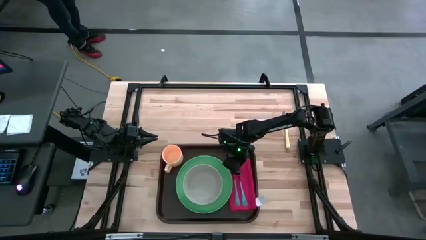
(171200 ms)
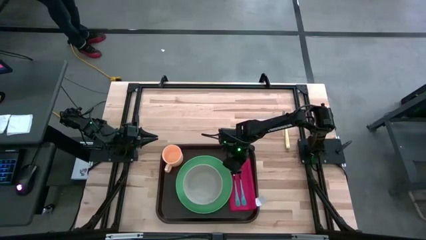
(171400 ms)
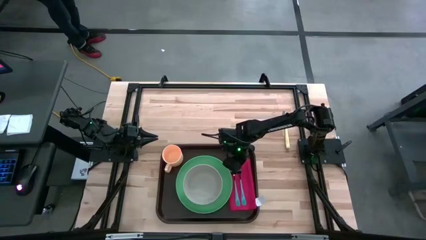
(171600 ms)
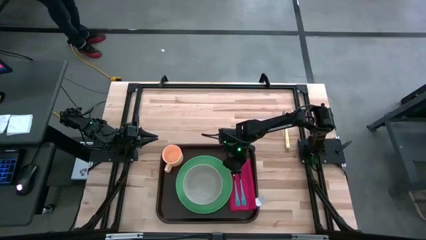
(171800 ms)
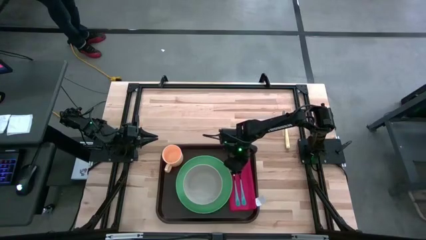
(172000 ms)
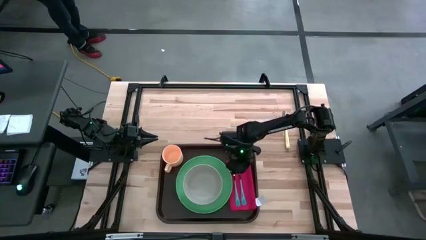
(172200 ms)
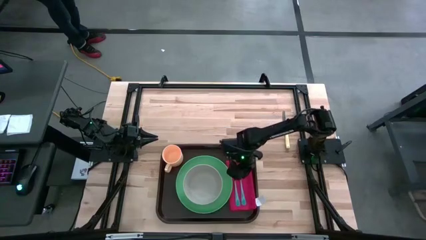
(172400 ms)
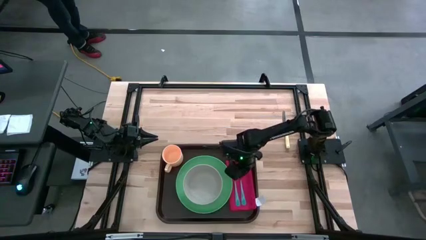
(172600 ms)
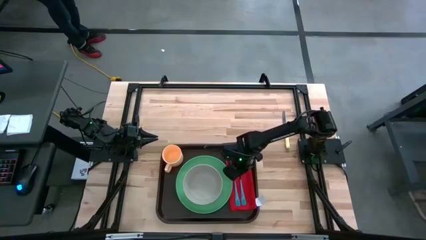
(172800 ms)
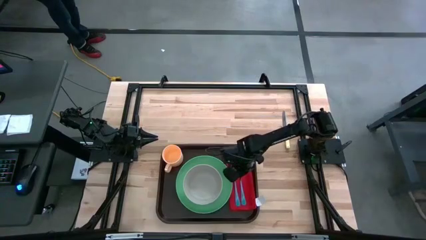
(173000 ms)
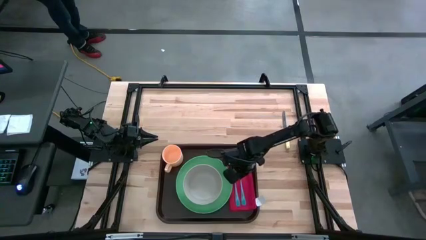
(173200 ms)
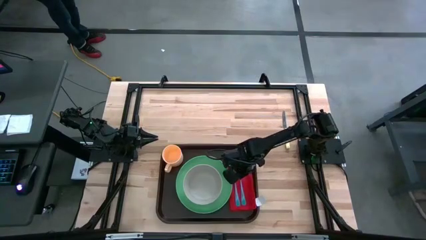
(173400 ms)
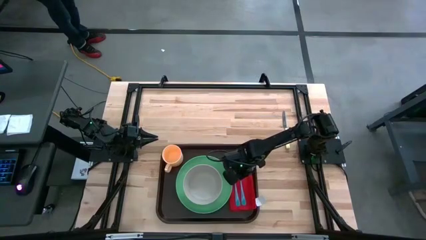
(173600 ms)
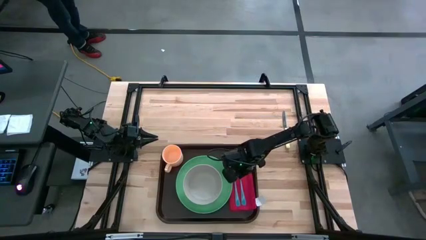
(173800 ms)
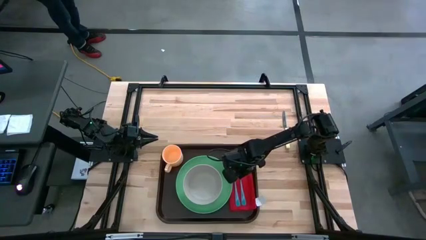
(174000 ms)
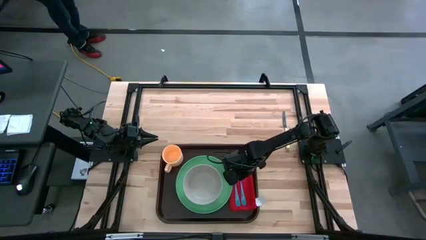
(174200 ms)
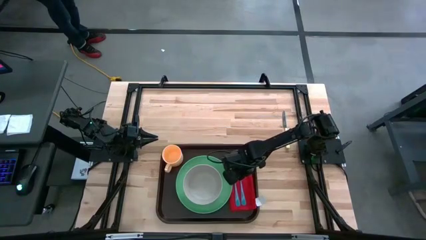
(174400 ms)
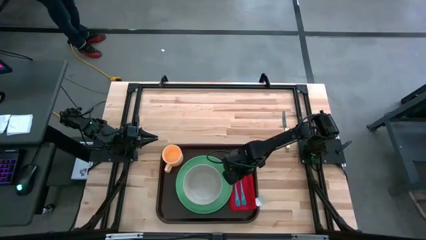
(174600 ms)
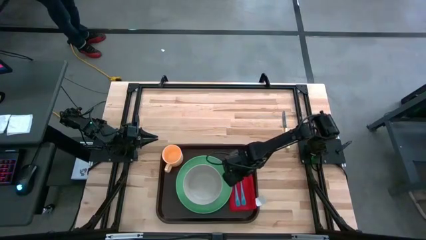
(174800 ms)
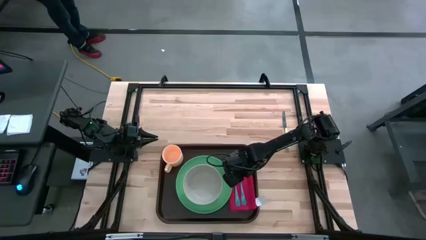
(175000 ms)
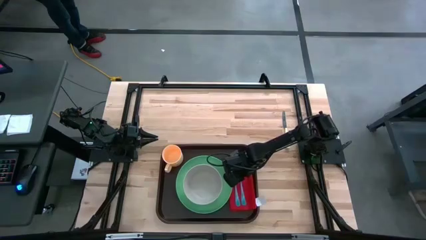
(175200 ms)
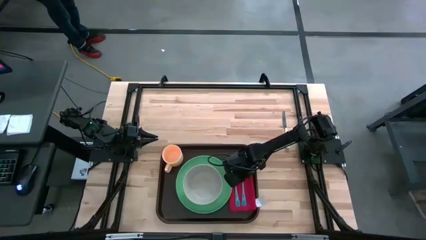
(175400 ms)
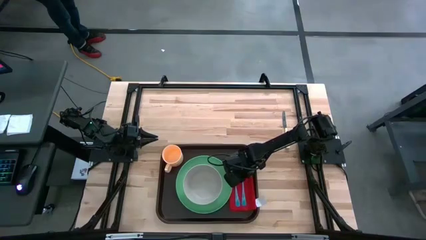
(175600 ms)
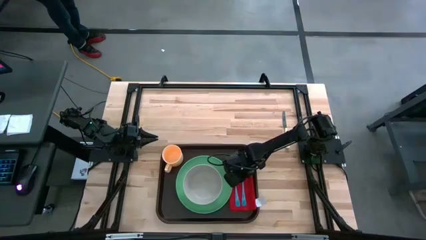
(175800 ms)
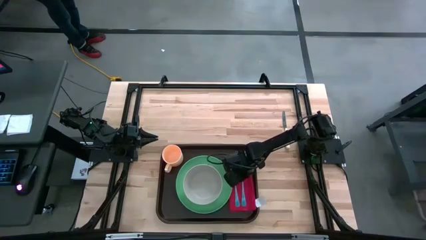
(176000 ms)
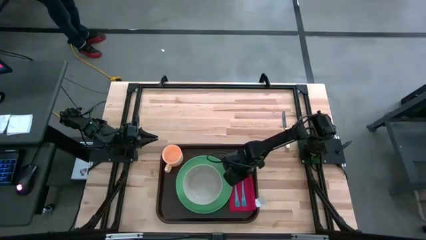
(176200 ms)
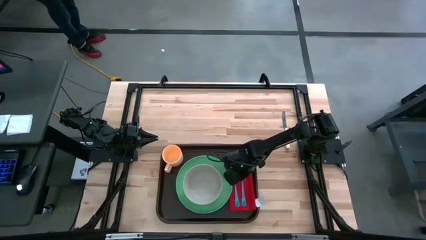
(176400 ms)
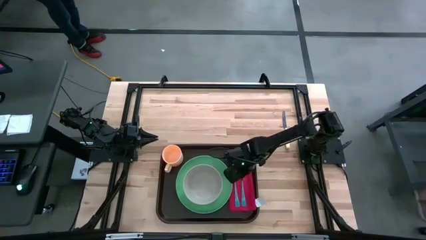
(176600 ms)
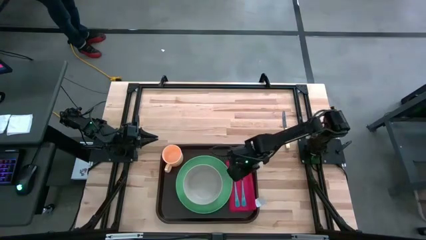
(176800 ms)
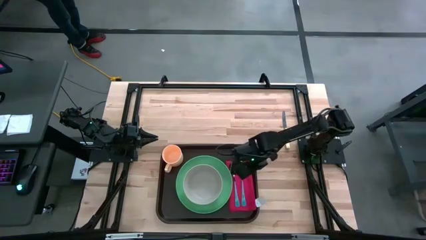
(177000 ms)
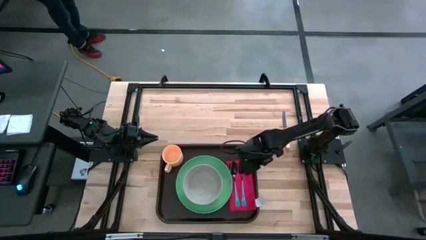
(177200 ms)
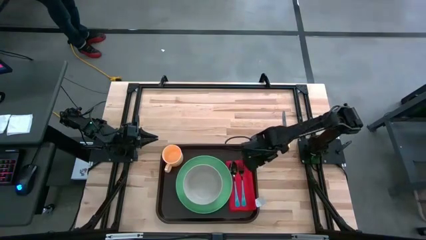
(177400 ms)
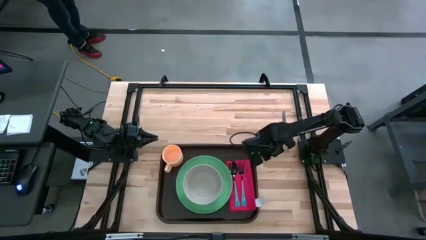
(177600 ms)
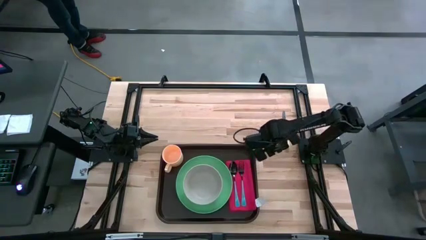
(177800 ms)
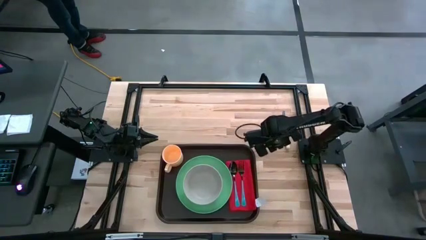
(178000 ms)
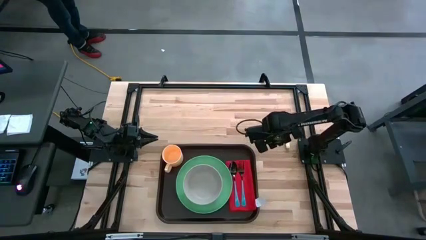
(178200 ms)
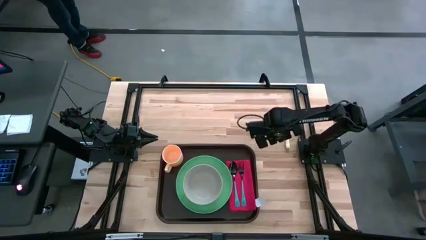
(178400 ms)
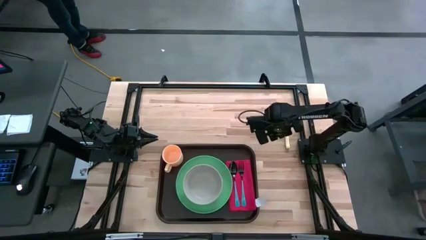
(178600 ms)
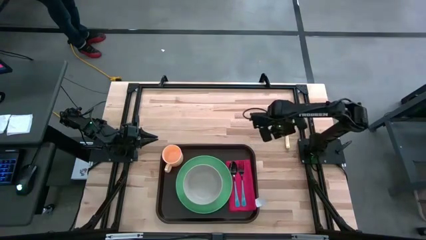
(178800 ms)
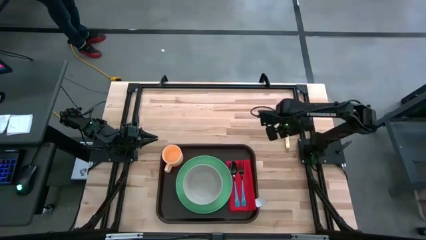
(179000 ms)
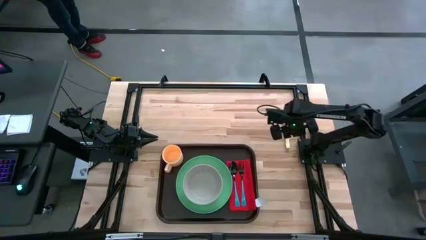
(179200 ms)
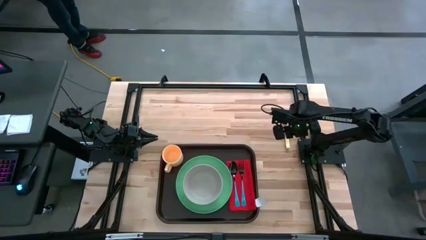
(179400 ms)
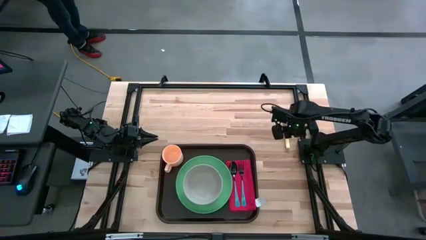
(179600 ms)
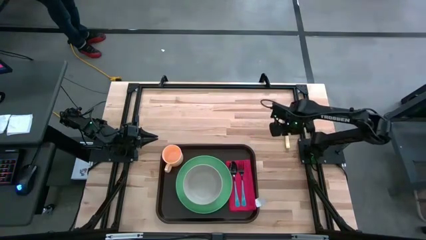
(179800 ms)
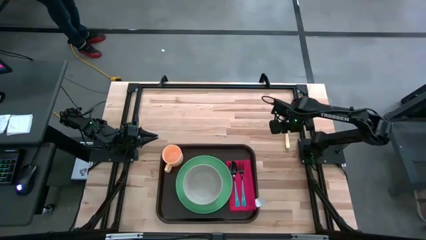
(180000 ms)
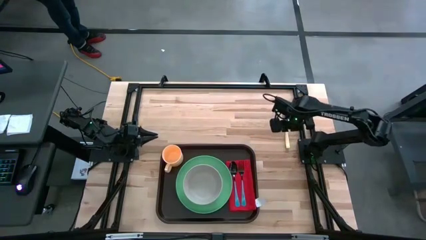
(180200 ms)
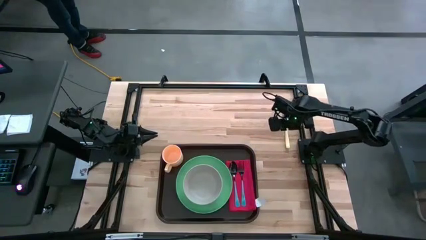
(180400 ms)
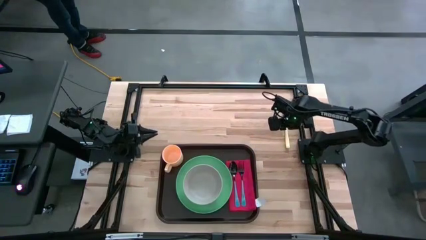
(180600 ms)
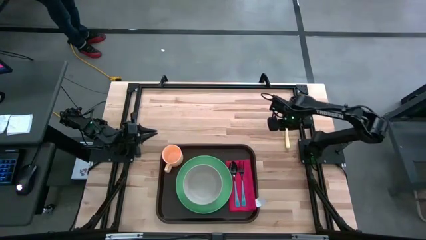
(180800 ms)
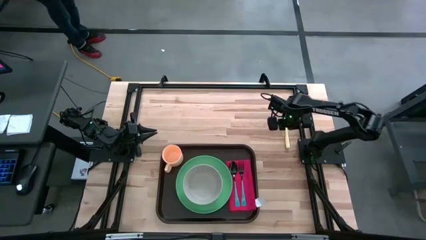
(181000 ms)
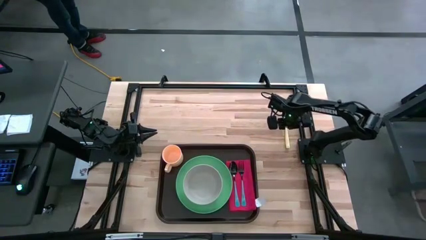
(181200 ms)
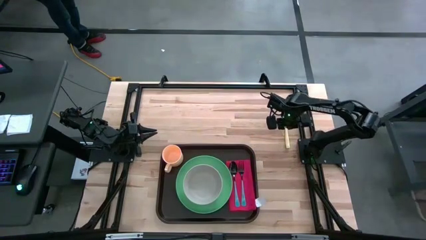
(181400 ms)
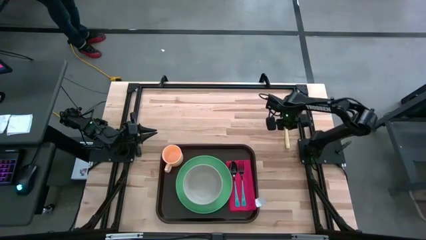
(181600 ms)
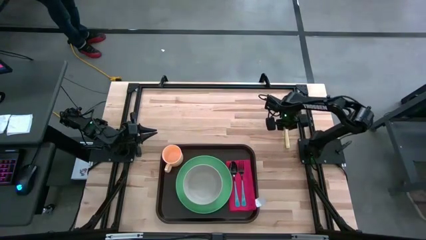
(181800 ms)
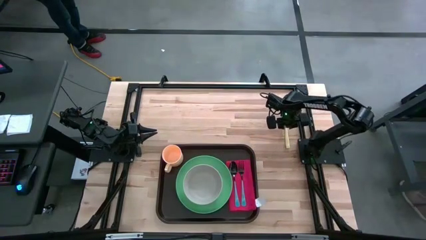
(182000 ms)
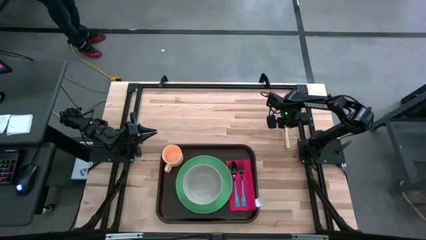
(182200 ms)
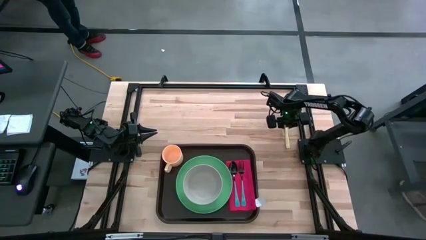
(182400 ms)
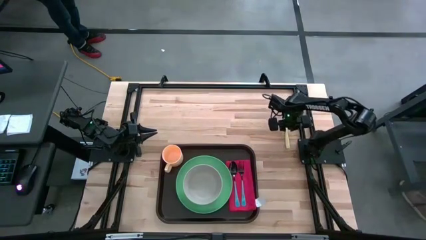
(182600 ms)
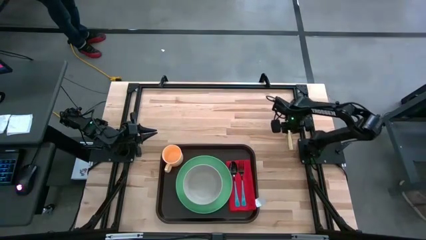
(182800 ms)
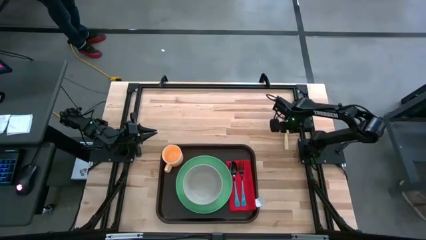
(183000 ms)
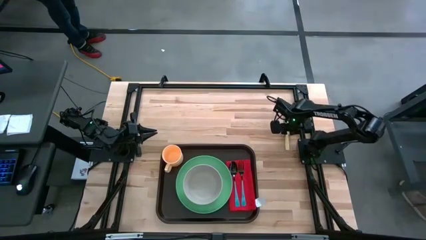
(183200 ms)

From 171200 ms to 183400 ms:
Task: Set up tray
Put the table knife on the table napkin to the right of the fork on the serving tray

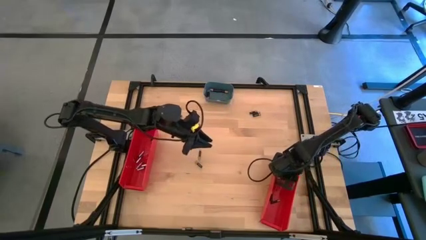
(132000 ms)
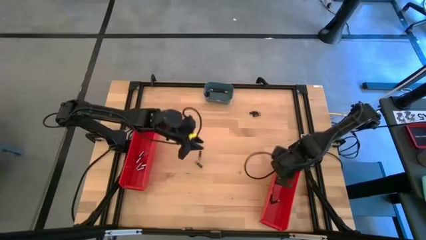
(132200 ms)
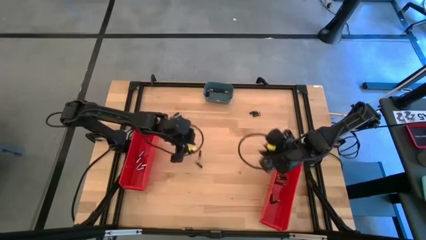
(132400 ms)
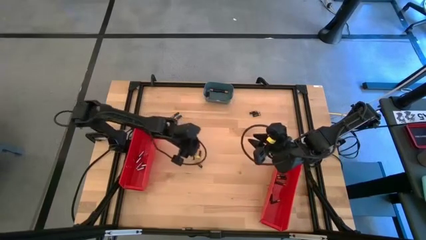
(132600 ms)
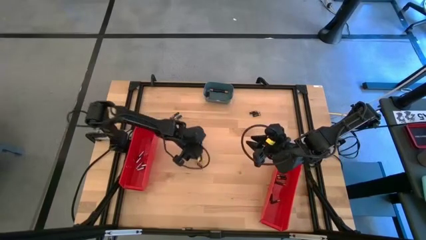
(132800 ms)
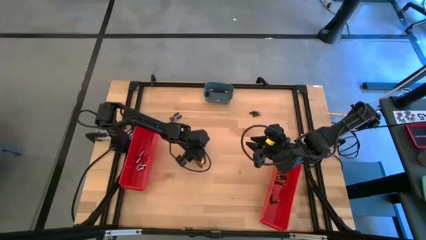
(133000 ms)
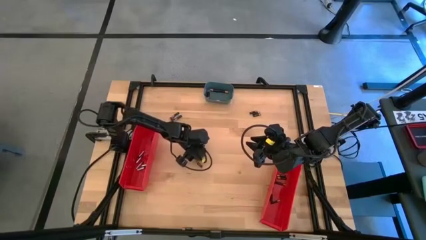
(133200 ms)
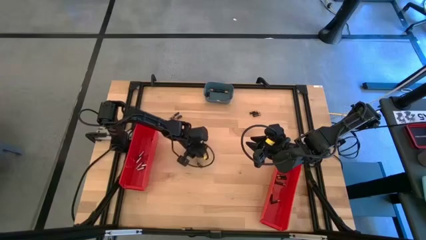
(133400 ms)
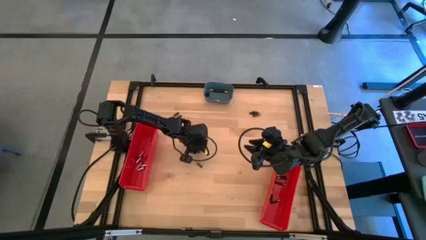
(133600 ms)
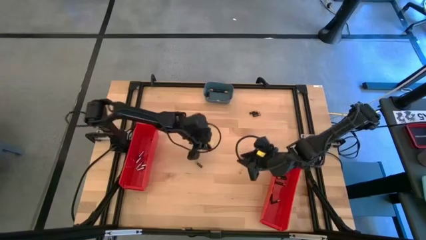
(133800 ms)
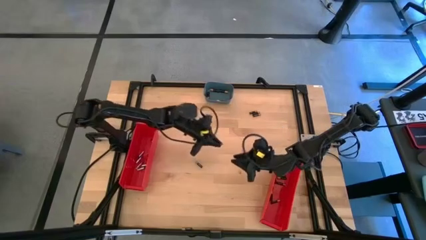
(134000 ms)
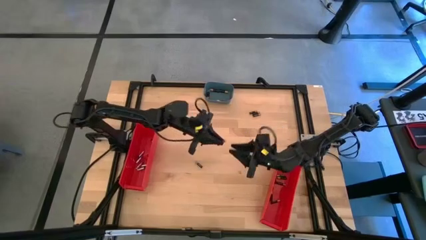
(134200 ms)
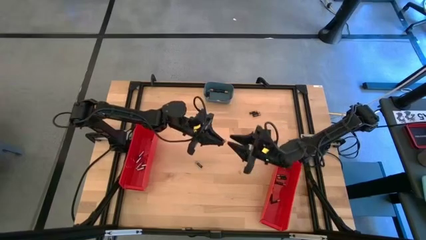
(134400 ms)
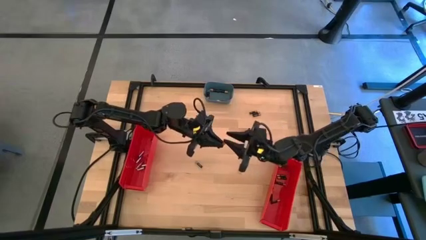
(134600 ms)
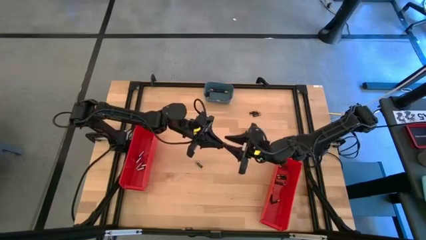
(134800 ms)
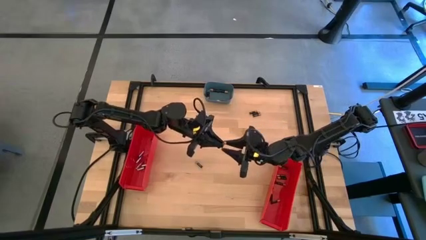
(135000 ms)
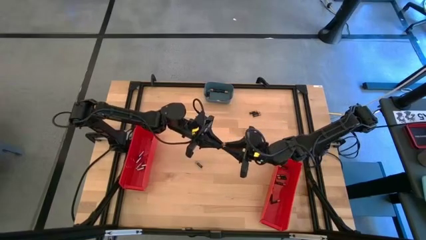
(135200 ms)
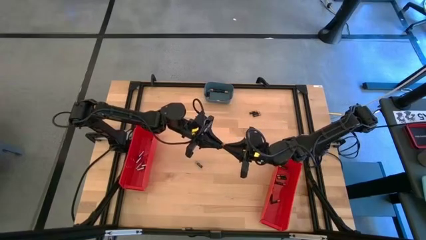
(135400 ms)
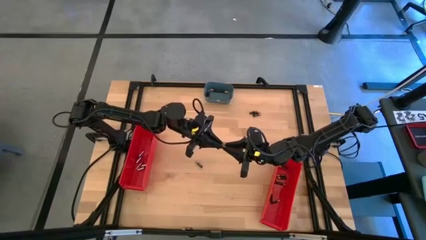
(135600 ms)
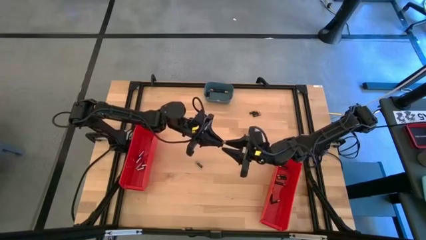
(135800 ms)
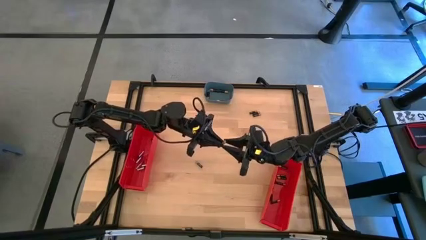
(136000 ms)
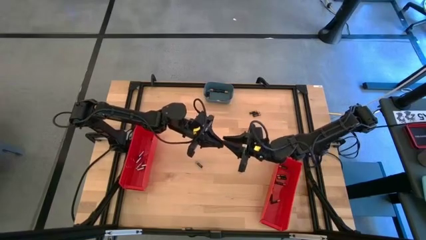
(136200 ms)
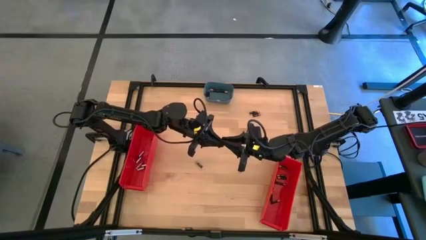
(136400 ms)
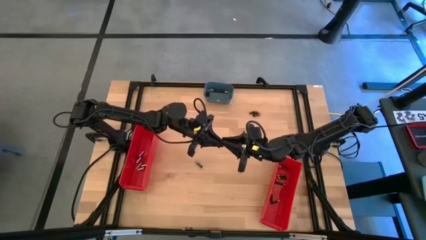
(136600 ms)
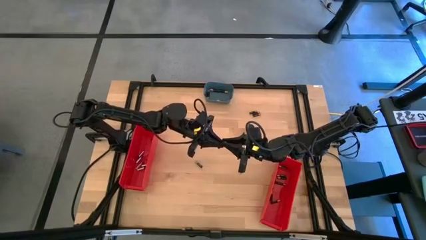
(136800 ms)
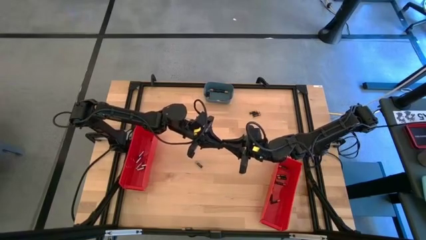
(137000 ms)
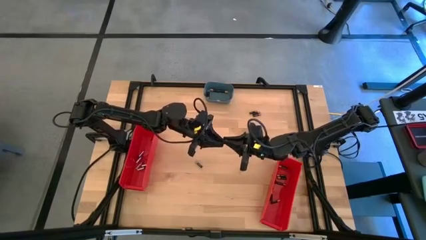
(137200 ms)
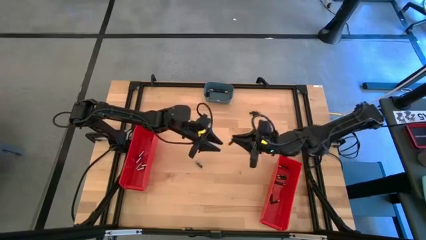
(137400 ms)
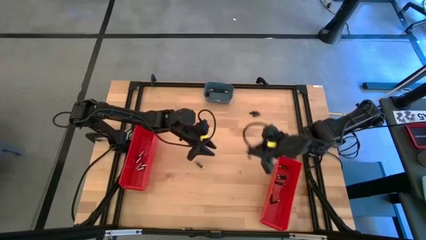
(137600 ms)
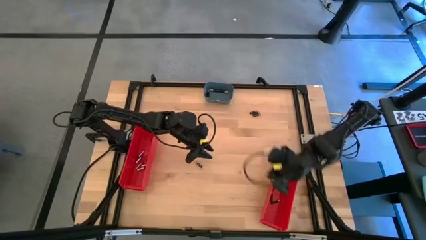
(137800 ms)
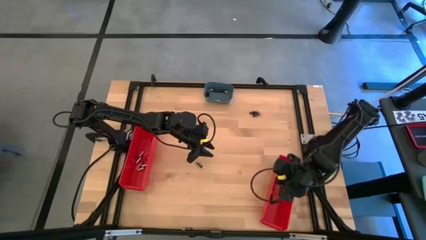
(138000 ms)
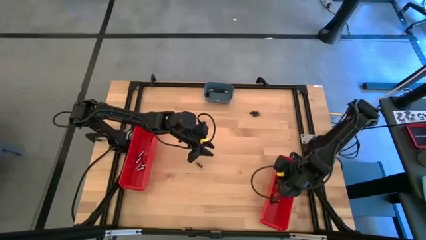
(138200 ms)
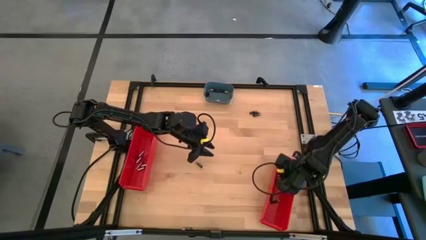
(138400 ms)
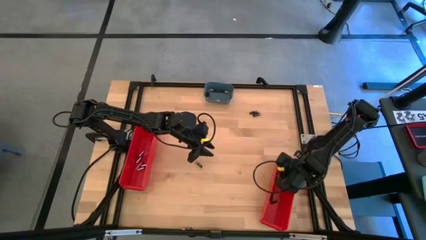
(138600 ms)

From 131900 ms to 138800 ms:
Task: Sort batteries
Put the small brown battery into the right red bin
